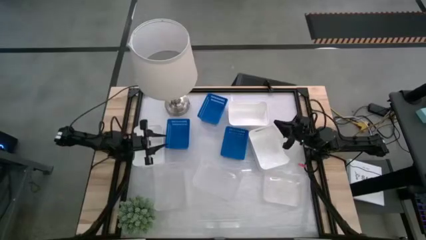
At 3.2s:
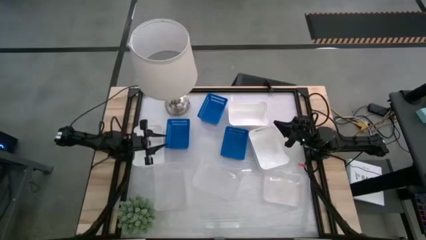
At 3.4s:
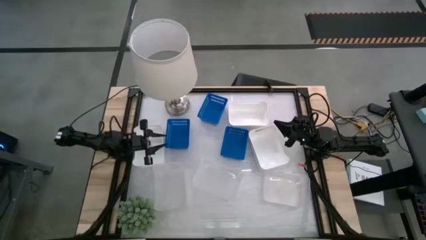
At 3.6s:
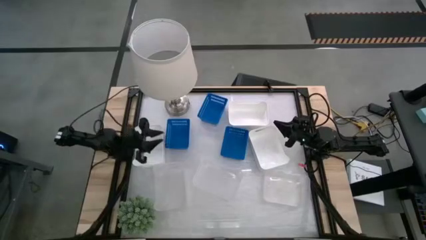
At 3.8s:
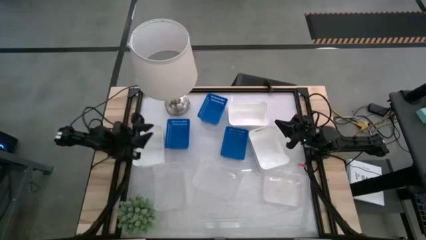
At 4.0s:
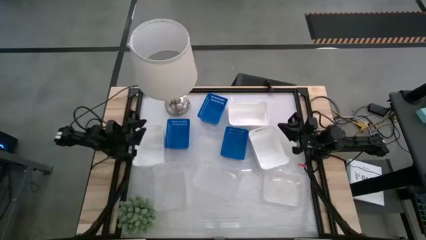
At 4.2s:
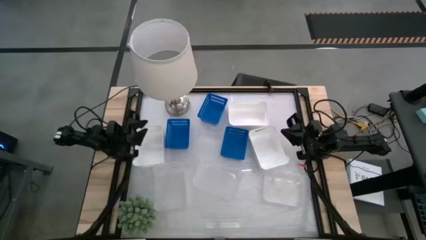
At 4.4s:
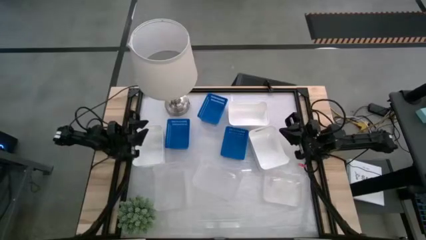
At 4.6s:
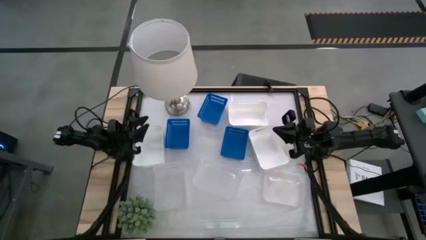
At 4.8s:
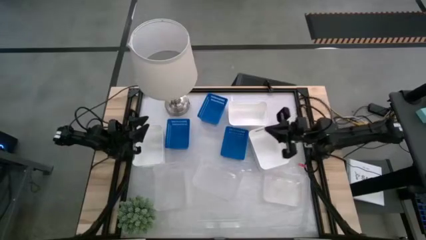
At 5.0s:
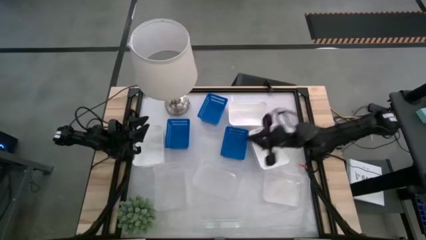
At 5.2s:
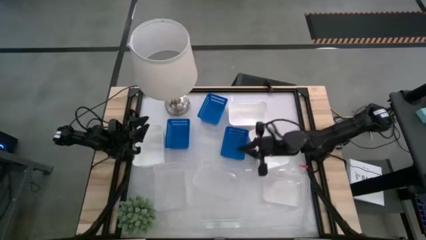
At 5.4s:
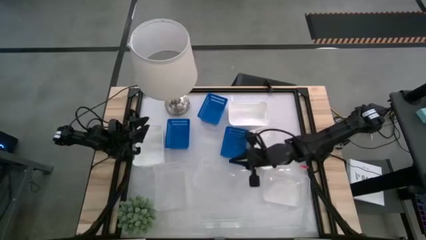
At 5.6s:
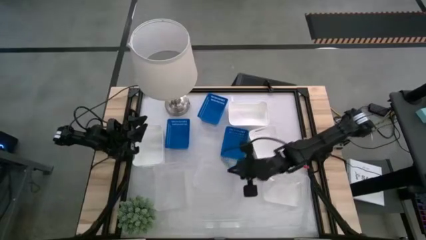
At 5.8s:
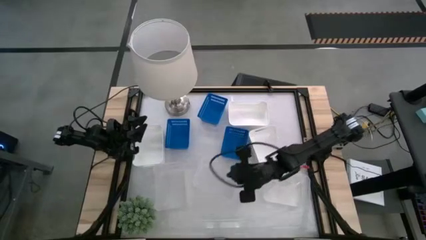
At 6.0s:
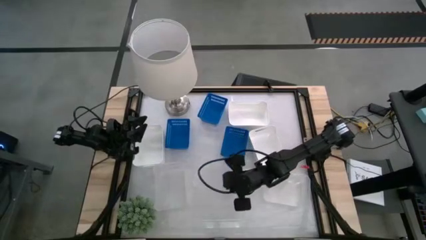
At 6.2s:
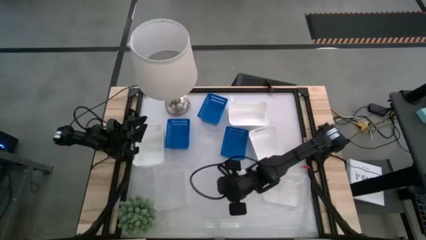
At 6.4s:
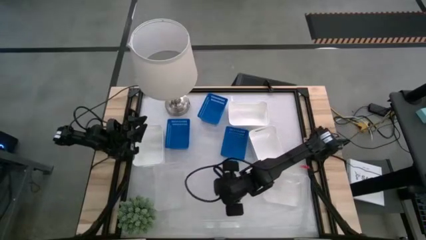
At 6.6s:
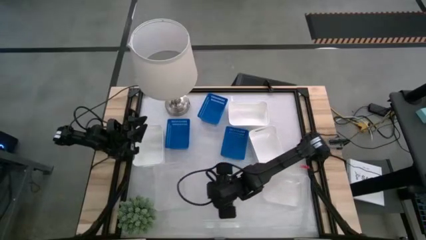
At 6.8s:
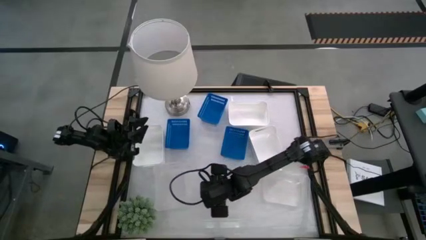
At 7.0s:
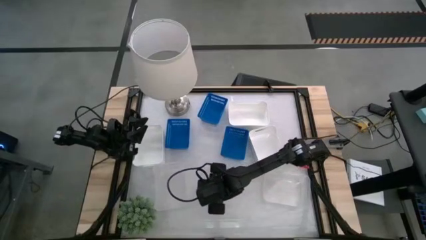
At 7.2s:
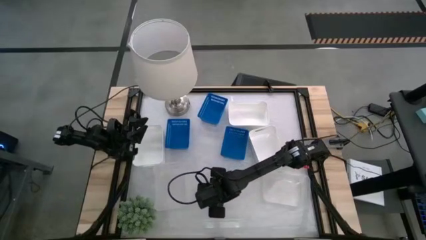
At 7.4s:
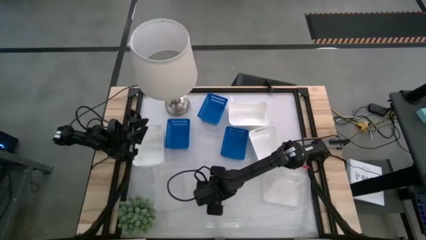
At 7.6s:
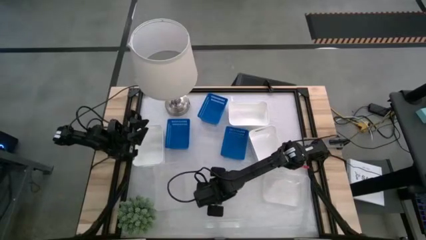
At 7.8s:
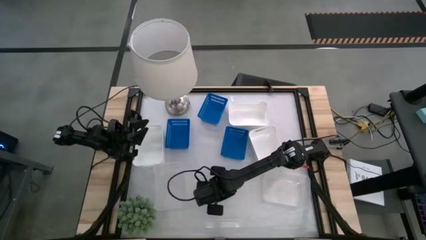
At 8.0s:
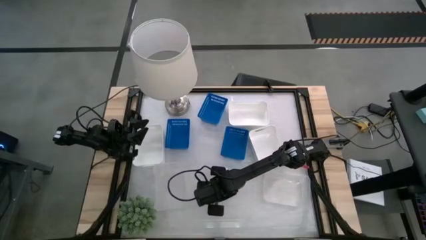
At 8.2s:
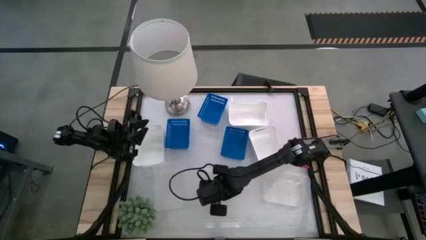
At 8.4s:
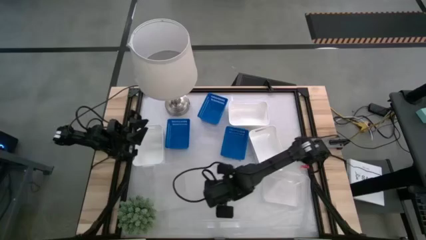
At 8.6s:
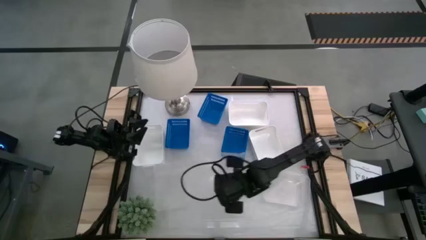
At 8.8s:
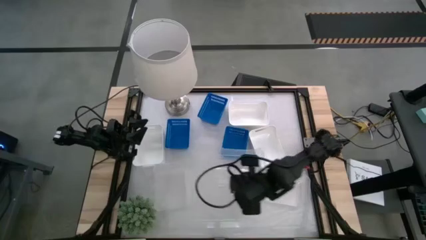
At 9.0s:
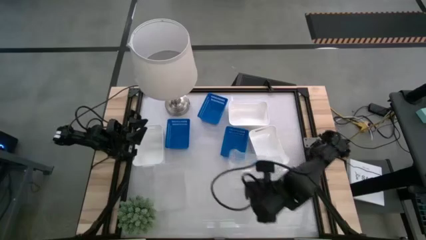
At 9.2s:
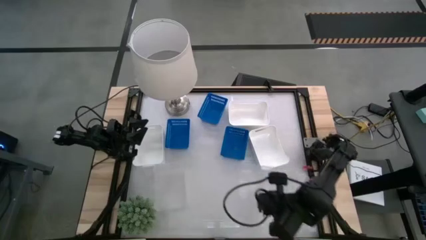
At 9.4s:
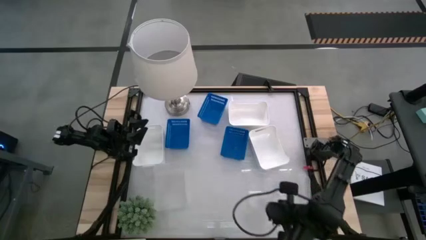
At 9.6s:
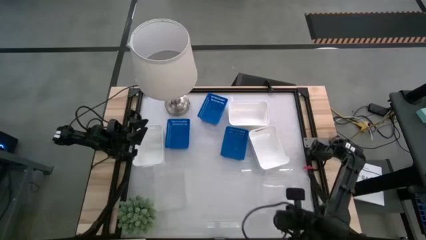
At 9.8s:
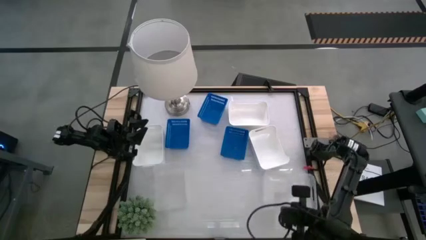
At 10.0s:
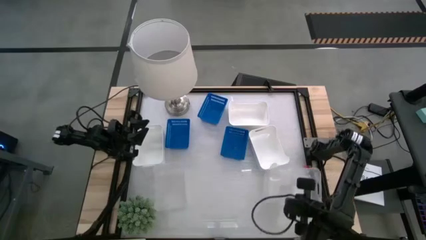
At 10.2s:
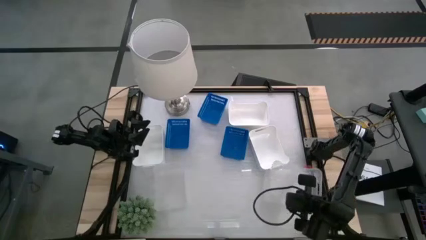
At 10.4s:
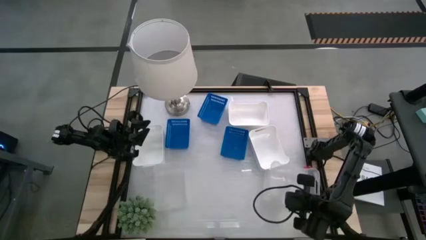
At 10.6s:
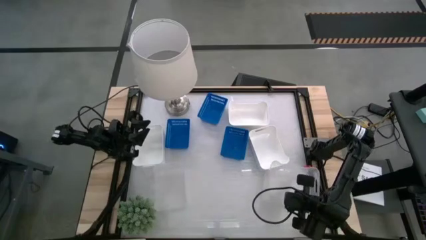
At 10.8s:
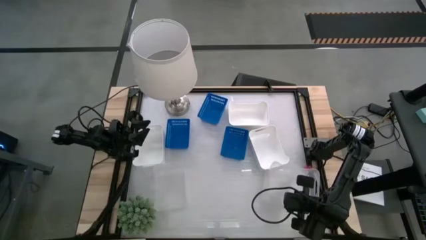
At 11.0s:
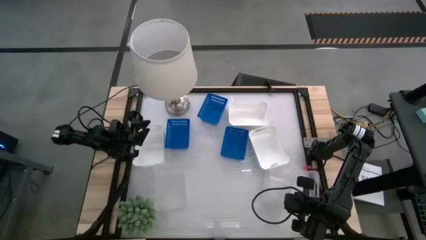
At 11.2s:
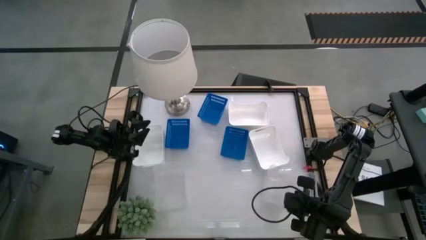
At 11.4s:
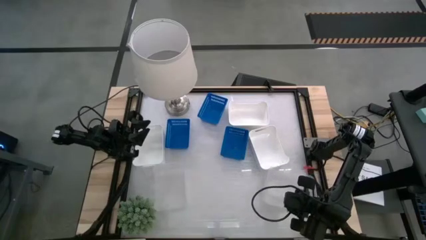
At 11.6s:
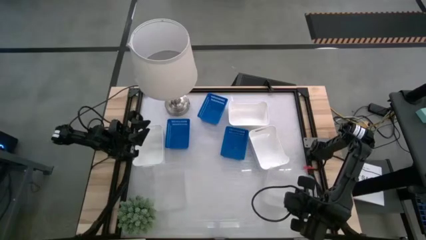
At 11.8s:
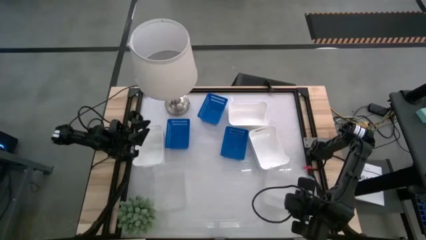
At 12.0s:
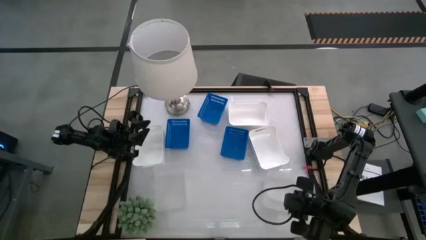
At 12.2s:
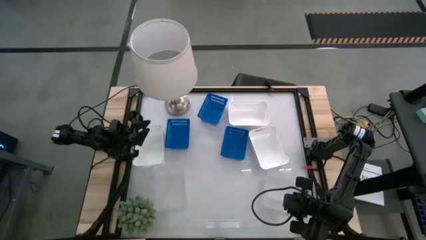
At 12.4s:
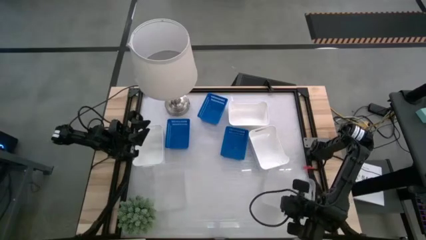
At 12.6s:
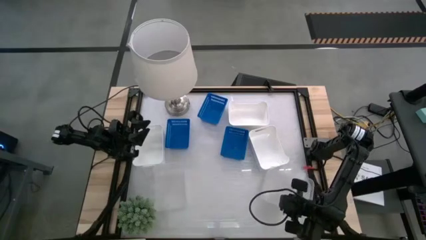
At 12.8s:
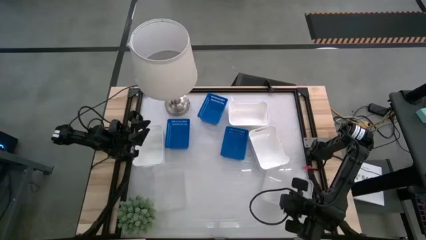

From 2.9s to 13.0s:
Stack the middle transparent bin on top of the right transparent bin

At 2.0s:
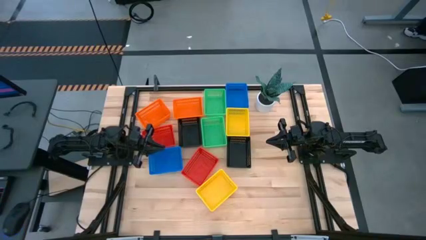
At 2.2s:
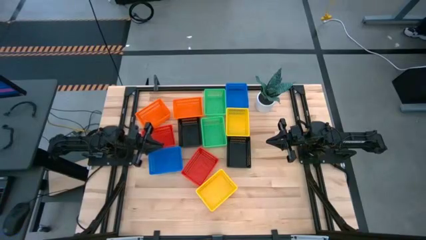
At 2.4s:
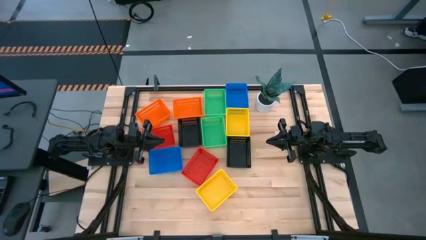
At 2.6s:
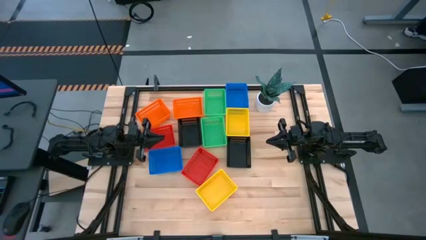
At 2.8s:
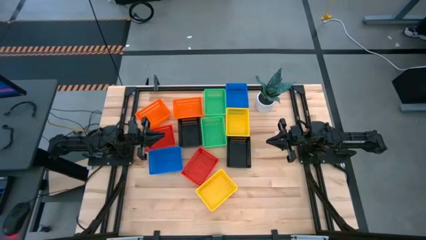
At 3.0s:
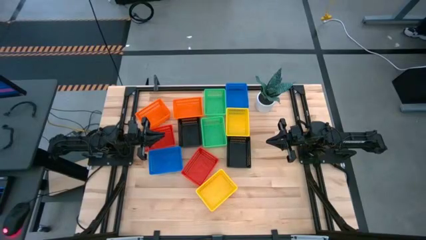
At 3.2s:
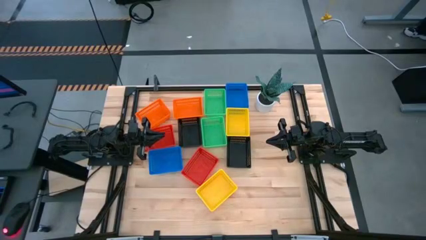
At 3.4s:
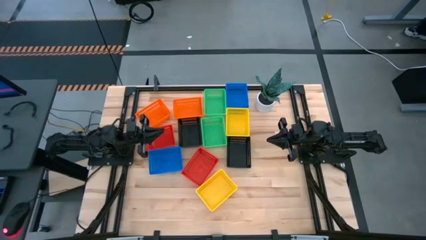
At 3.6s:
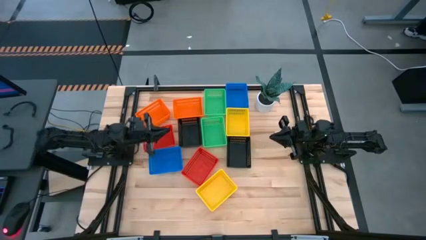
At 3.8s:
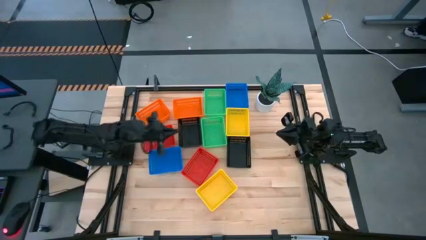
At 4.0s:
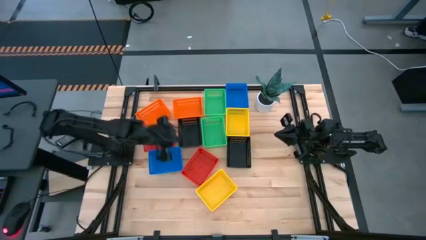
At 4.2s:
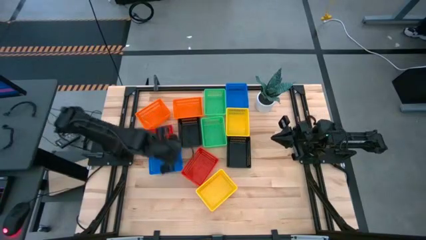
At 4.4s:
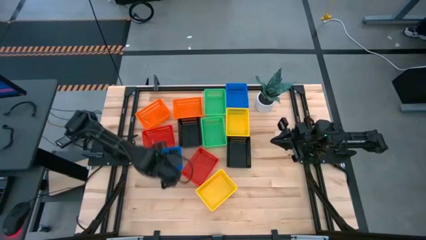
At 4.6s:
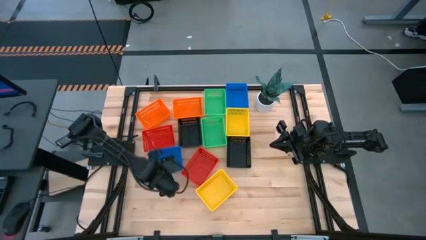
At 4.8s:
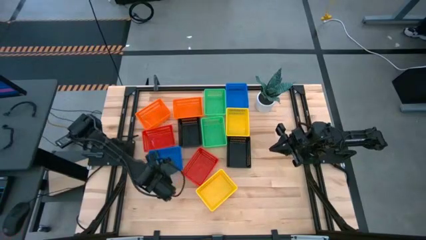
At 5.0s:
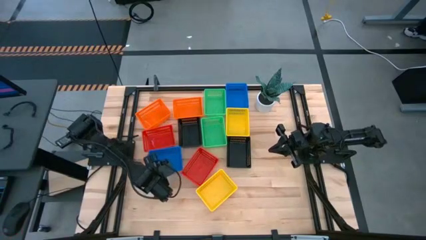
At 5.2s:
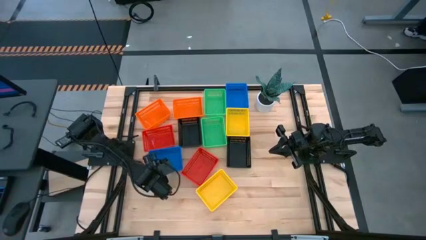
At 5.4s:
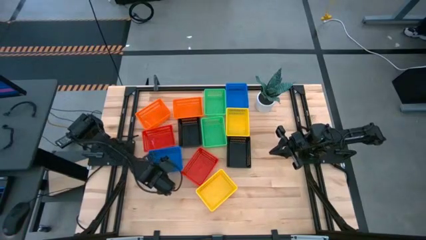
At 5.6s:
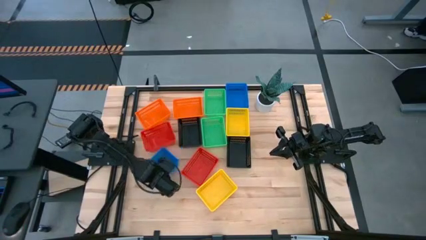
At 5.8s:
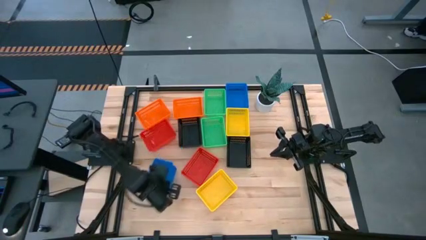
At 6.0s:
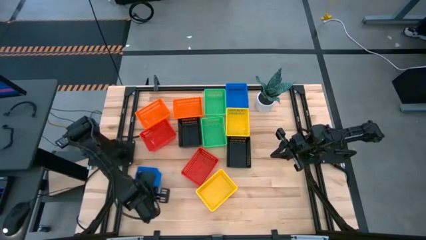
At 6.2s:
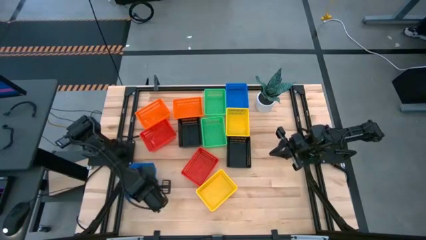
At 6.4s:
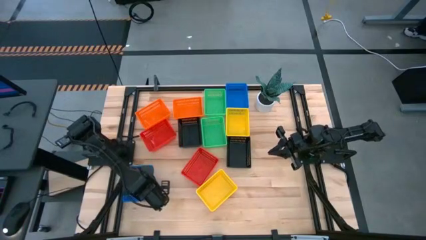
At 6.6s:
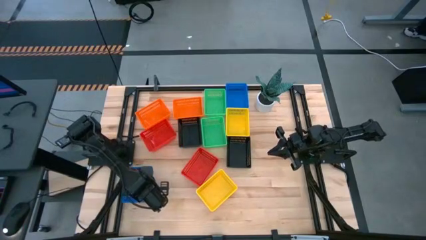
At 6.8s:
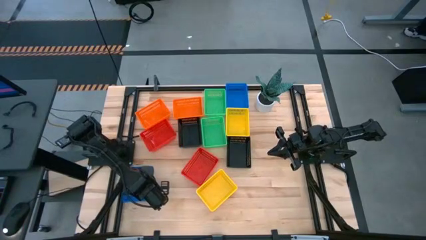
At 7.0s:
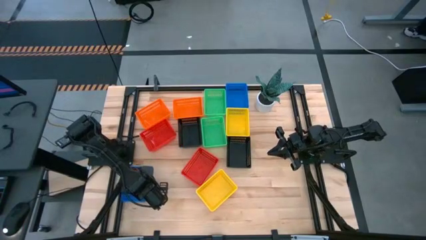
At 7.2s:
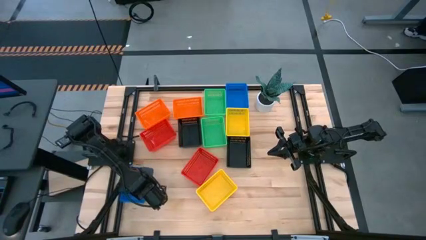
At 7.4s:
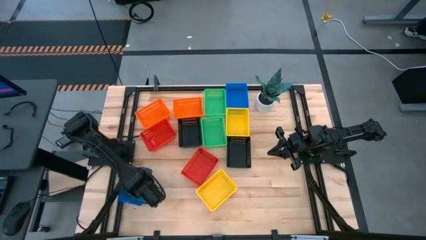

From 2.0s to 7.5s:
Move the bottom blue bin to the bottom left of the table
